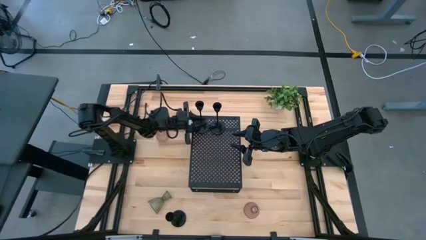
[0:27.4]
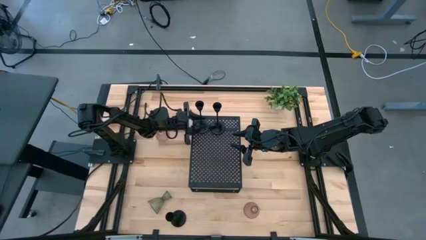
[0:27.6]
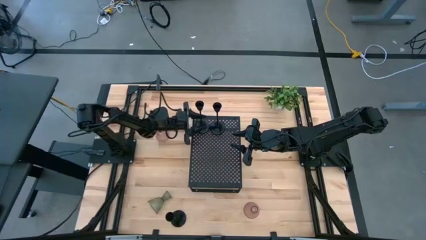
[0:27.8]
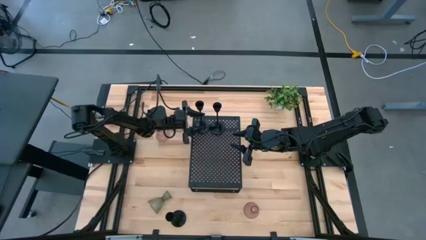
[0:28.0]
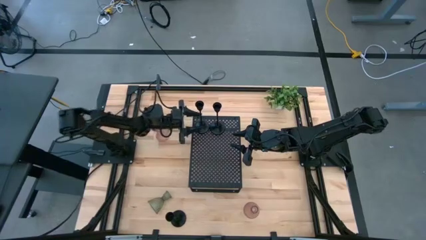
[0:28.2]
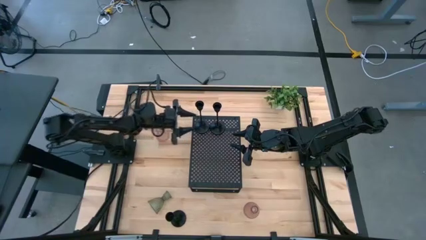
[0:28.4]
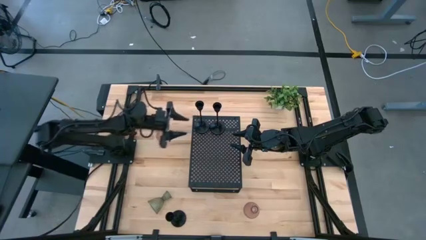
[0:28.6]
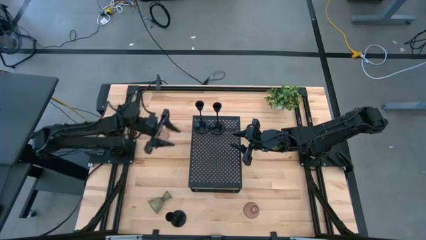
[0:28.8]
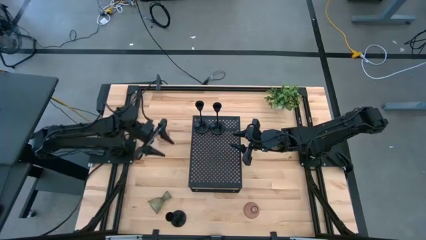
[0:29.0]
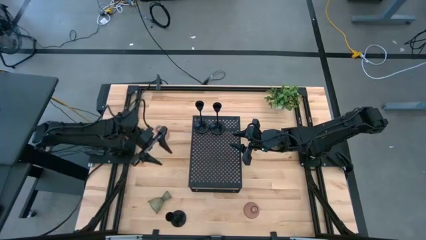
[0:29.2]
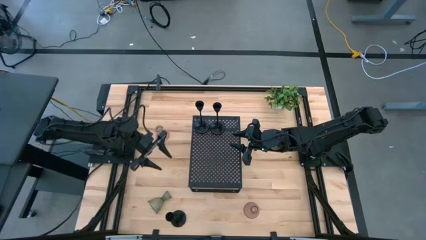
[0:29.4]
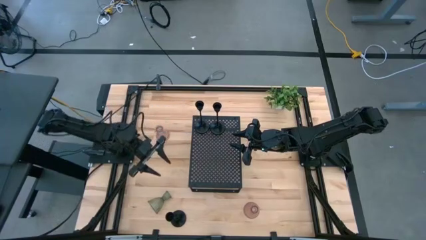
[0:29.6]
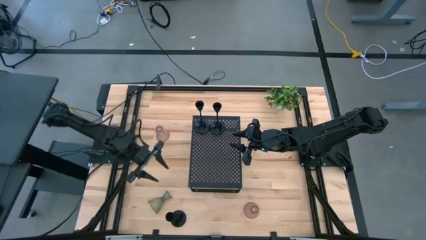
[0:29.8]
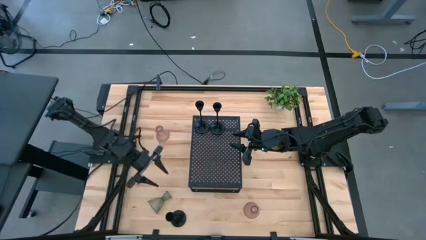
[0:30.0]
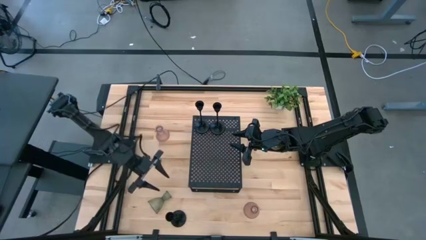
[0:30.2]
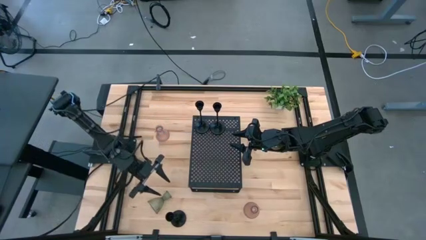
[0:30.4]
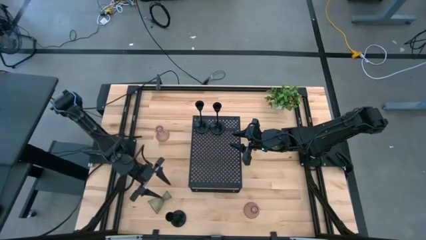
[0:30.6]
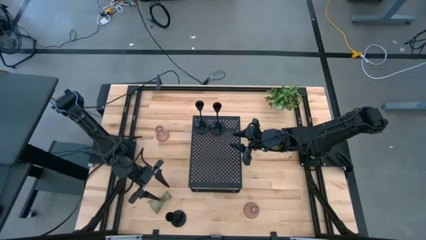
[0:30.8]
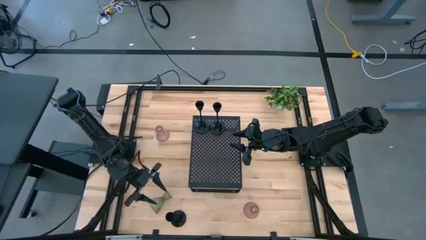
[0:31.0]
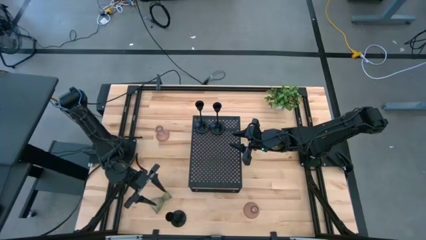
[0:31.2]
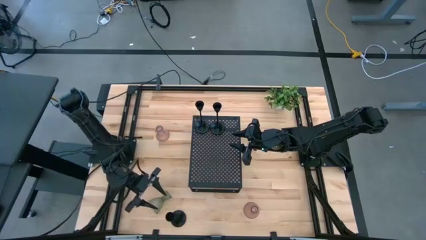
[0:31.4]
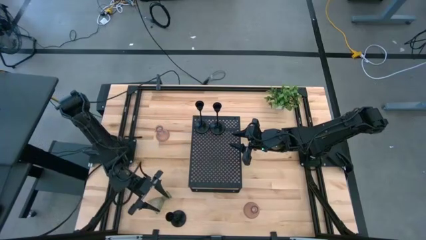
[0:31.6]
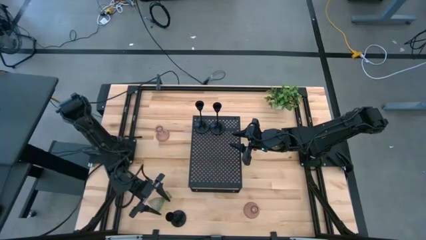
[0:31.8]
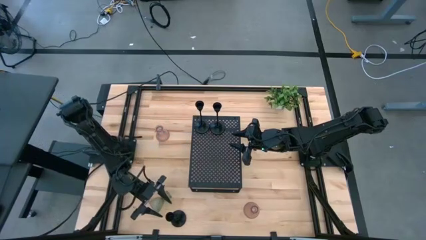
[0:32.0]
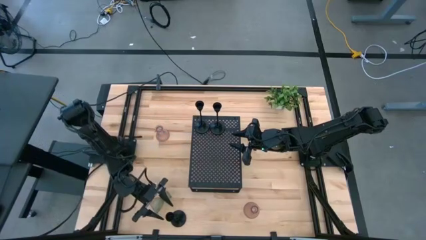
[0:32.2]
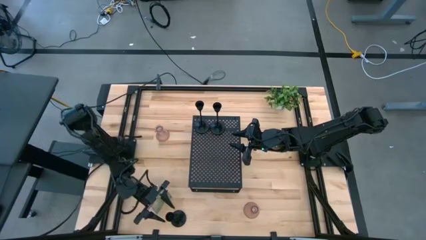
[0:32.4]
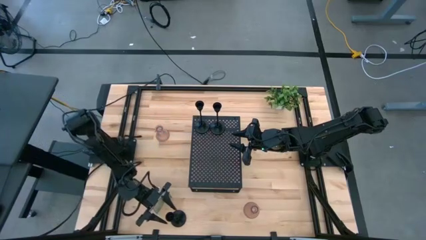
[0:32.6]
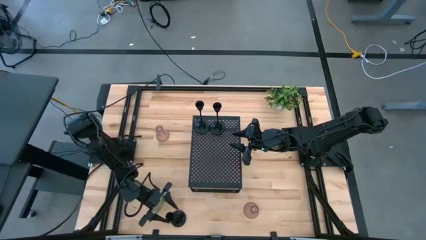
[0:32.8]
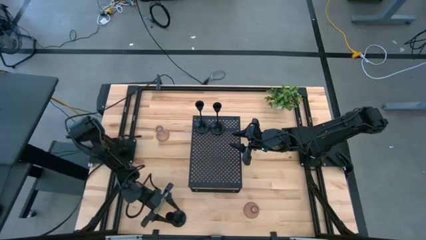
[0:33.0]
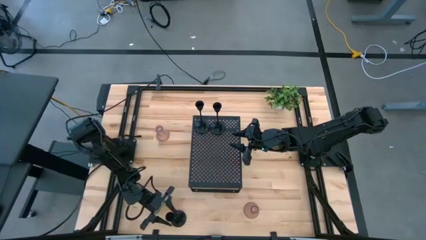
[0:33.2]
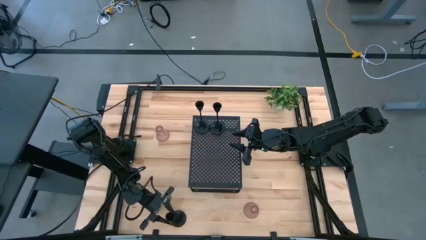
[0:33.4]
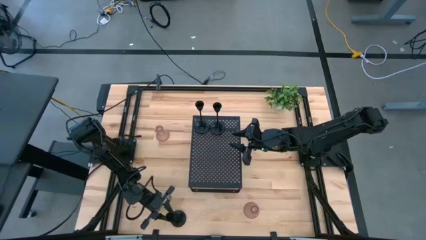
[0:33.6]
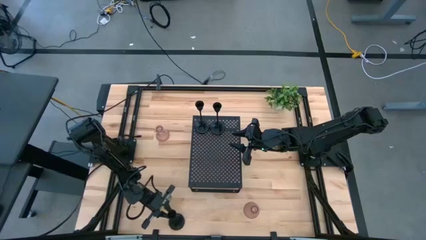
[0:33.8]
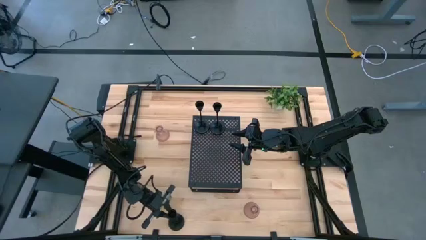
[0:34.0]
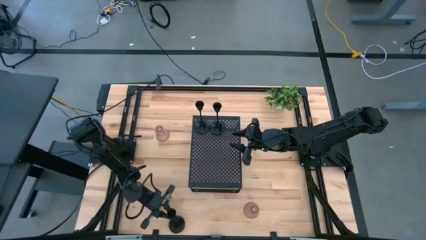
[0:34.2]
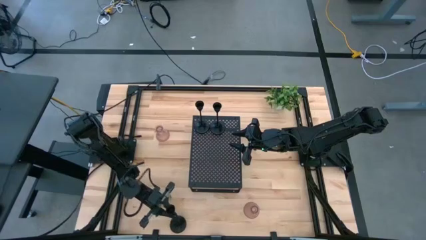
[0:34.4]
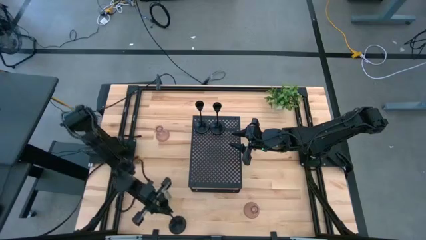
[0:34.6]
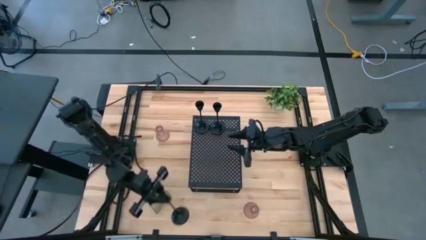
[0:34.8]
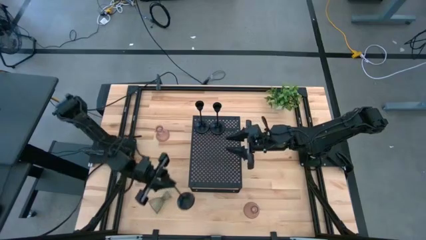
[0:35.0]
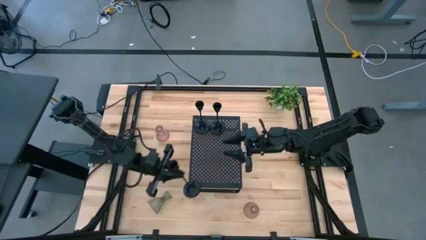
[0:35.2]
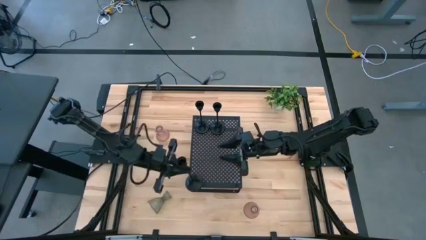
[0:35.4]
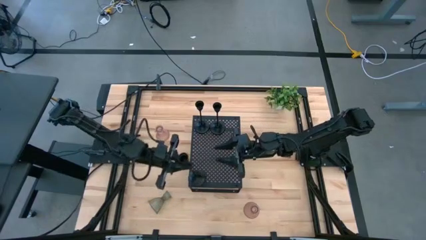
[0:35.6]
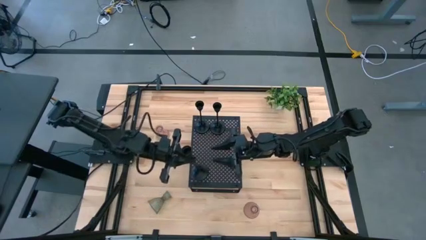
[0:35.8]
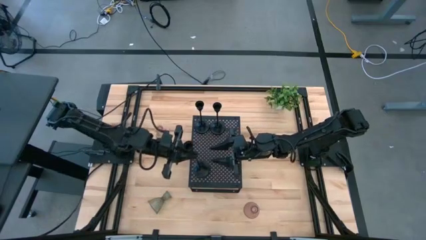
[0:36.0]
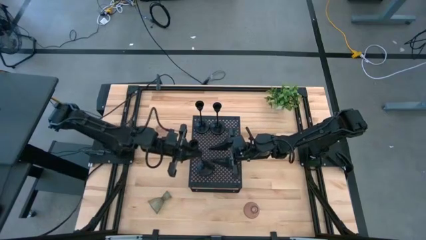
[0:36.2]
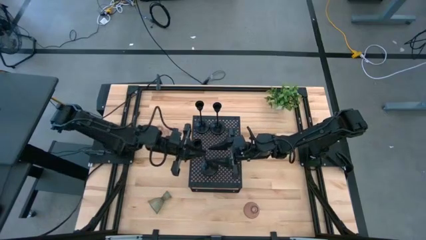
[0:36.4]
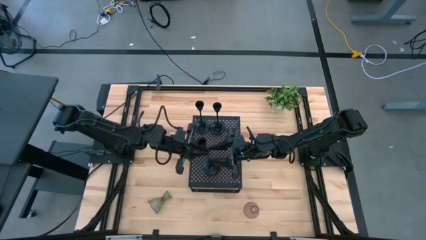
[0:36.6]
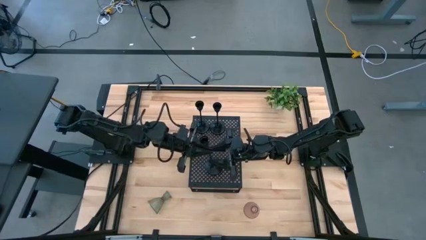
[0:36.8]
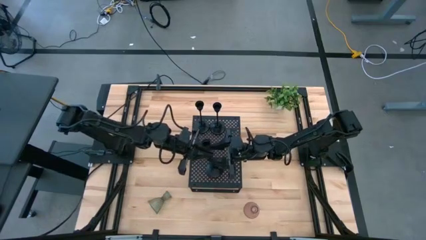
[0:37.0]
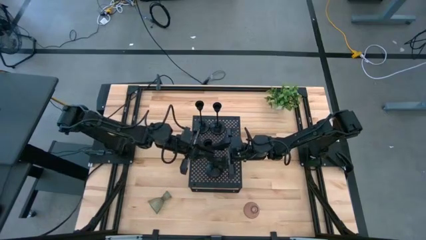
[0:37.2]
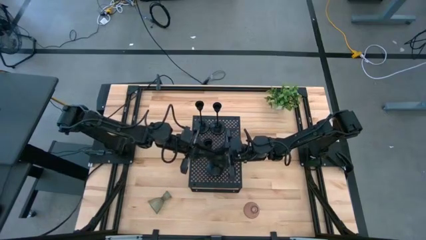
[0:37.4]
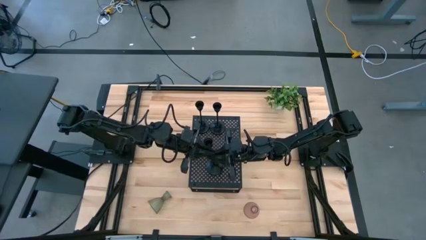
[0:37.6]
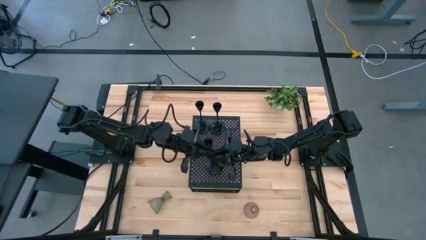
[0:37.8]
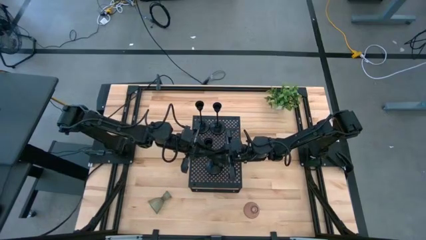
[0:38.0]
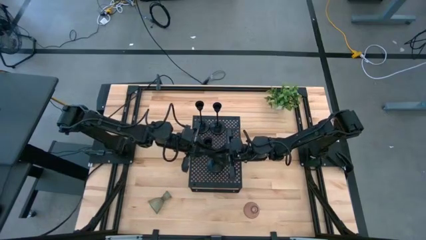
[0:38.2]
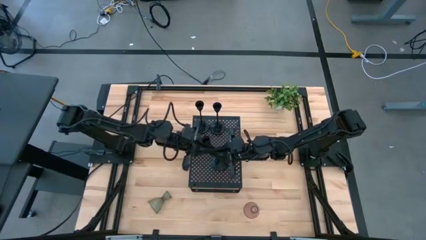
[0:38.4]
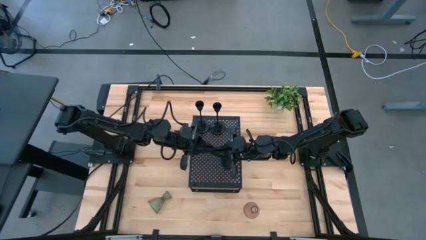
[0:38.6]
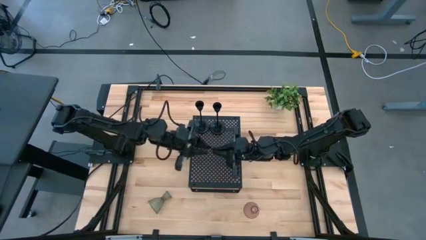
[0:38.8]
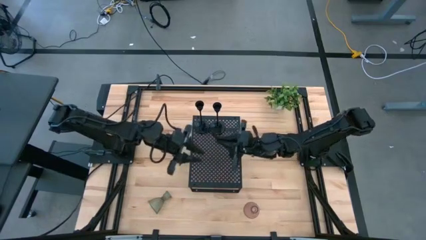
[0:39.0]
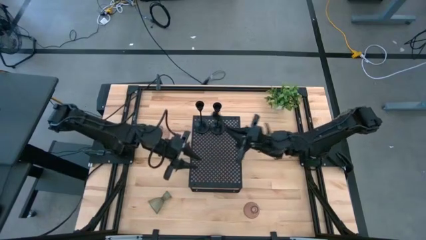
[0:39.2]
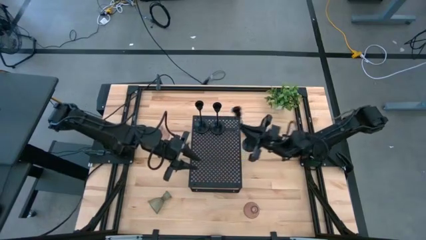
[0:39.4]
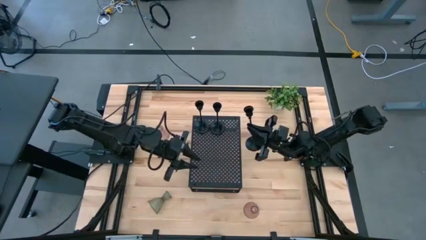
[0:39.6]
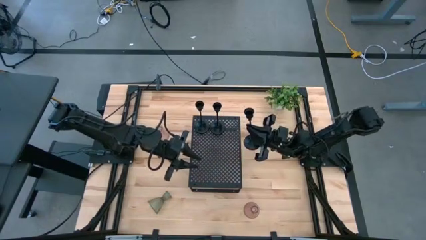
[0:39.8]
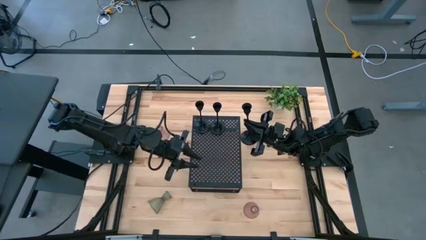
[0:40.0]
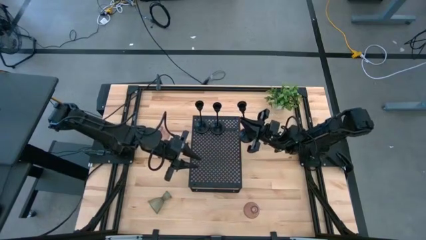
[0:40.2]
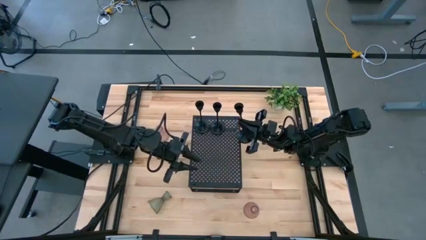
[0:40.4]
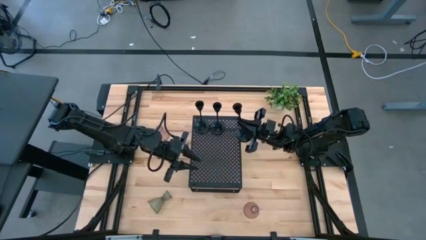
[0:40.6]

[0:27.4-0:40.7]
Task: Pick & Place candle stick holders
Put the black candle holder on the shelf aligned with the other black candle holder

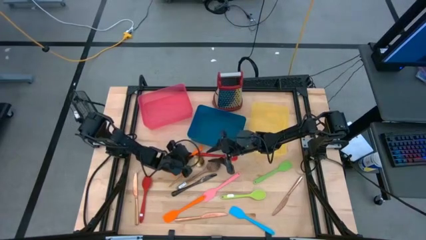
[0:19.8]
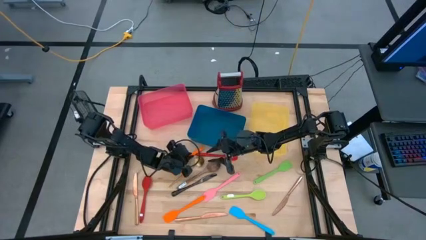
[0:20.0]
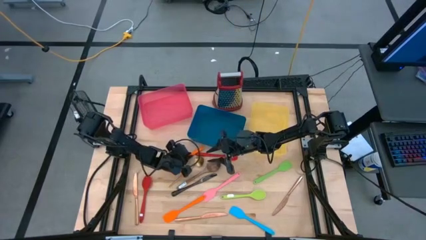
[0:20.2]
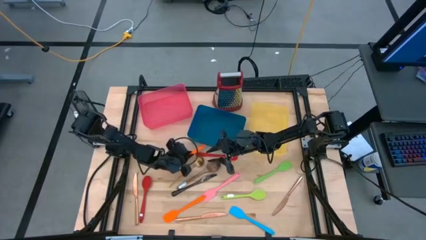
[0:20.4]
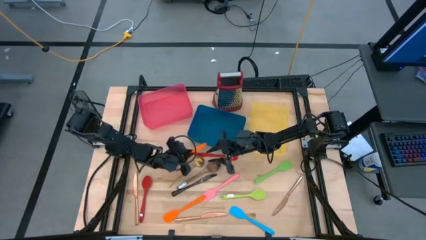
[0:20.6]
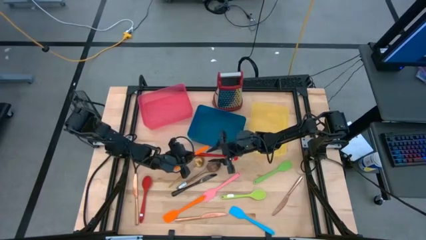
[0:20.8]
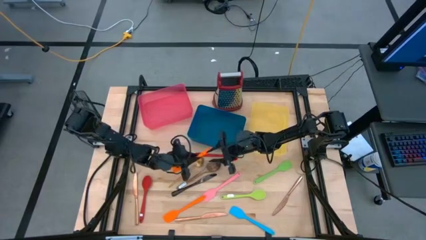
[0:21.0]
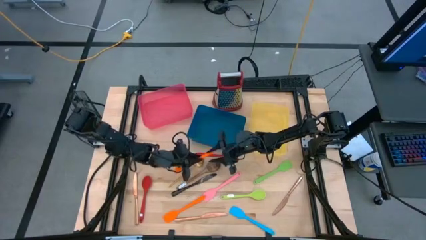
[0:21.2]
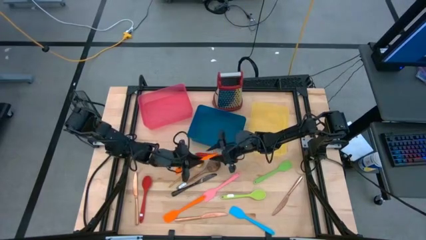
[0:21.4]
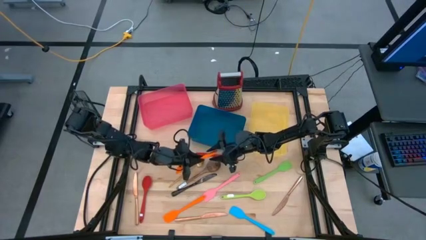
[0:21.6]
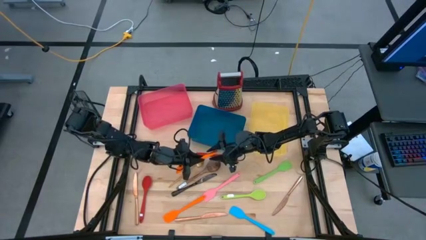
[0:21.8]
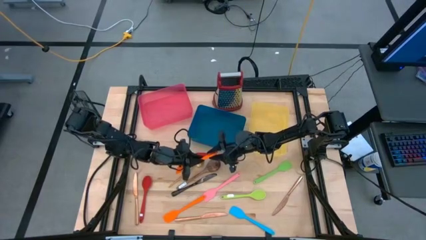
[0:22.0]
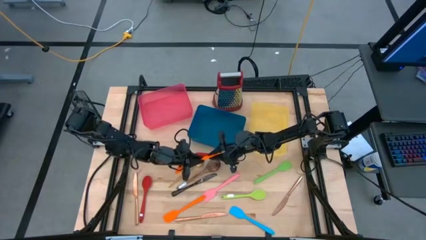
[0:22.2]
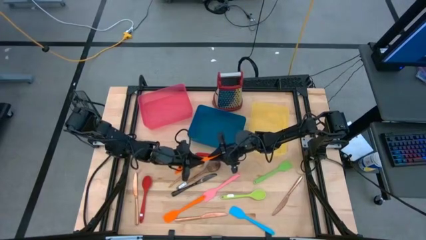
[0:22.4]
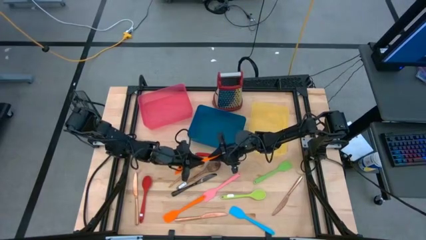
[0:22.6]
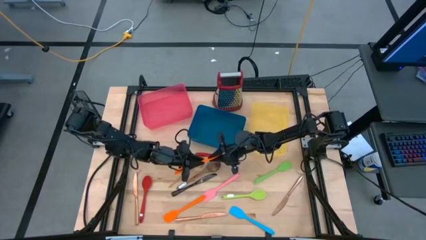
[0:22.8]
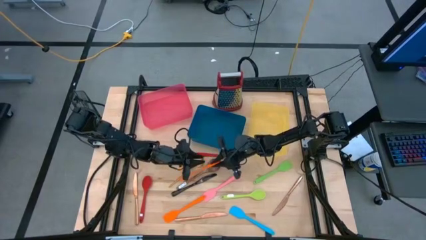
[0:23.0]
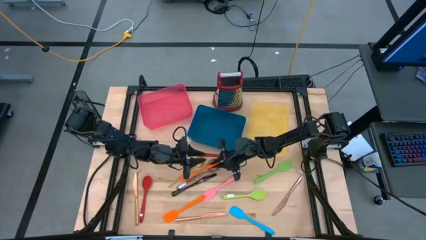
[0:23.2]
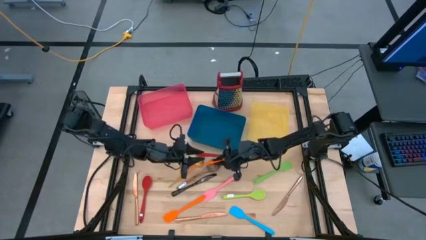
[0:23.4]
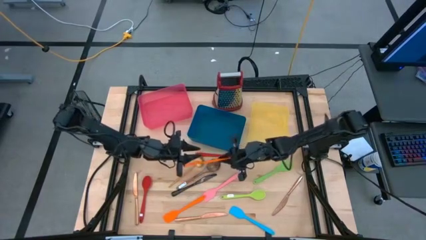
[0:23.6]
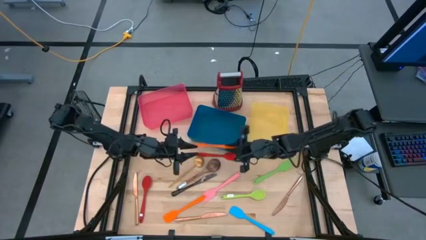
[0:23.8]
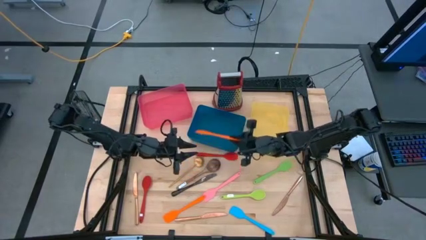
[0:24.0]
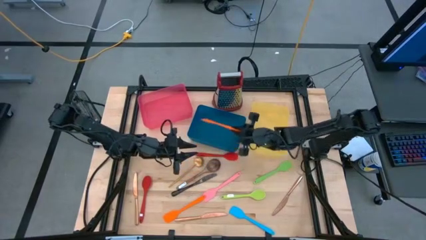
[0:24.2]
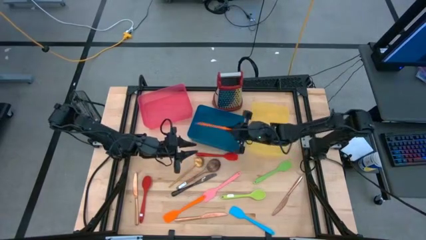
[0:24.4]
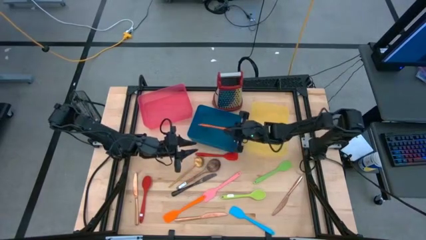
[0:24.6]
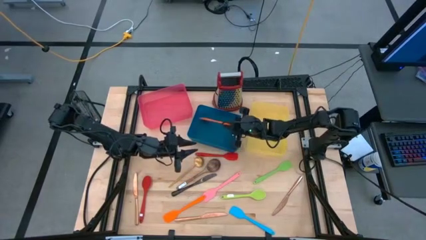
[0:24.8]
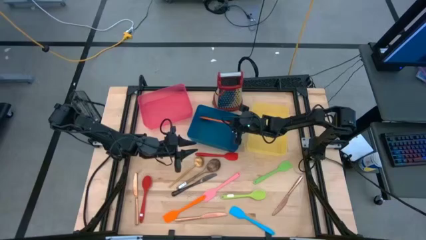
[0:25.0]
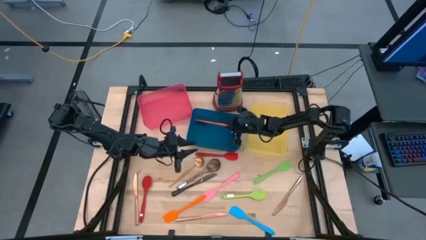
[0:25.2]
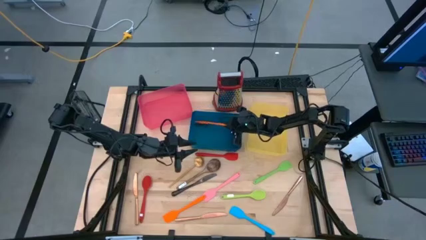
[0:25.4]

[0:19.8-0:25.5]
Task: Pick & Place Kitchen Items
Put the orange spatula into the blue bin
